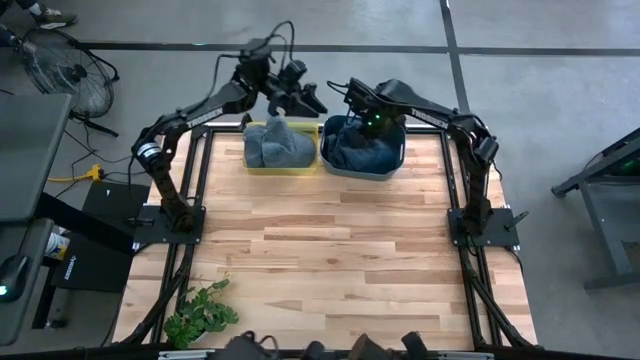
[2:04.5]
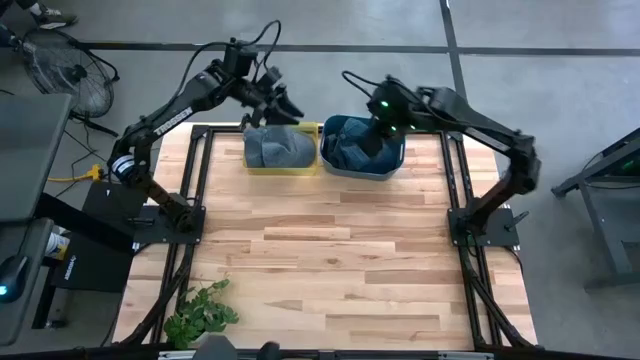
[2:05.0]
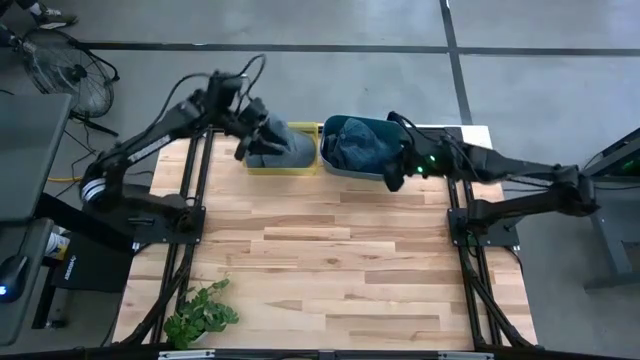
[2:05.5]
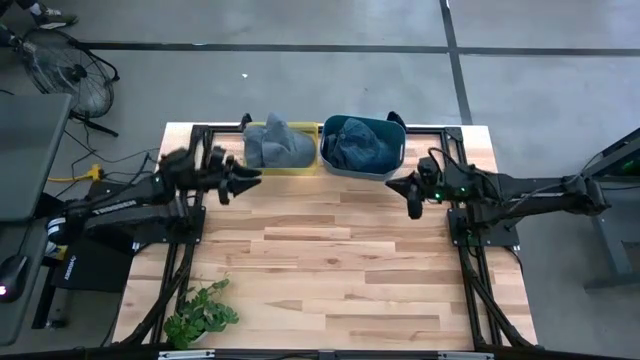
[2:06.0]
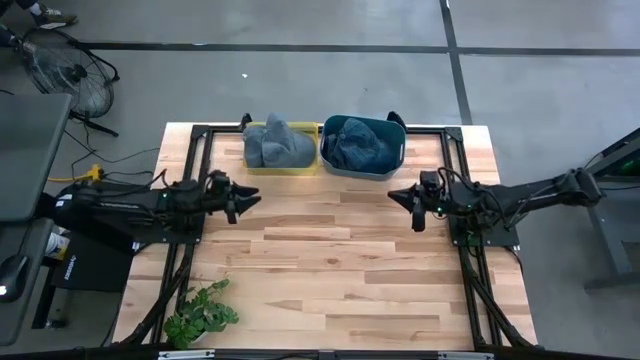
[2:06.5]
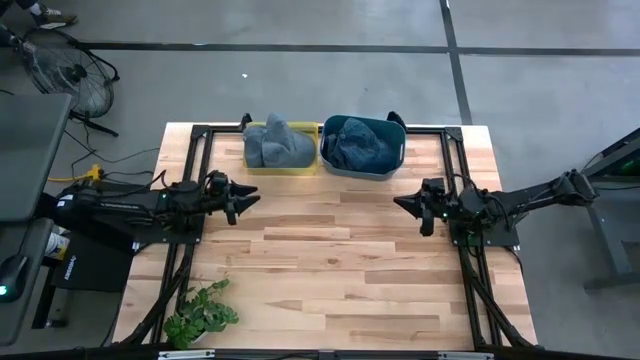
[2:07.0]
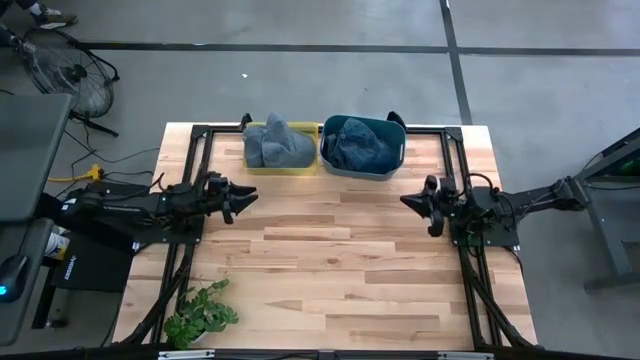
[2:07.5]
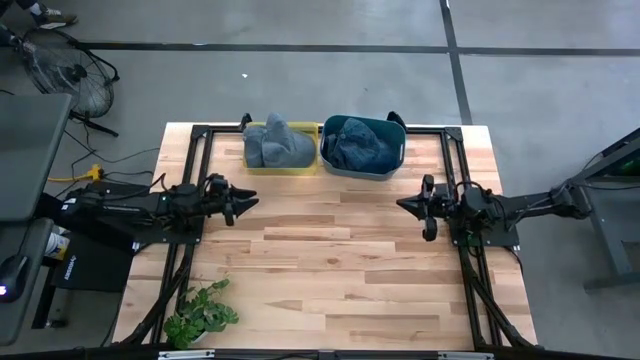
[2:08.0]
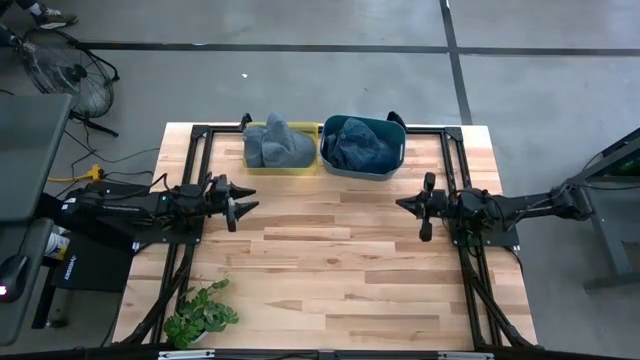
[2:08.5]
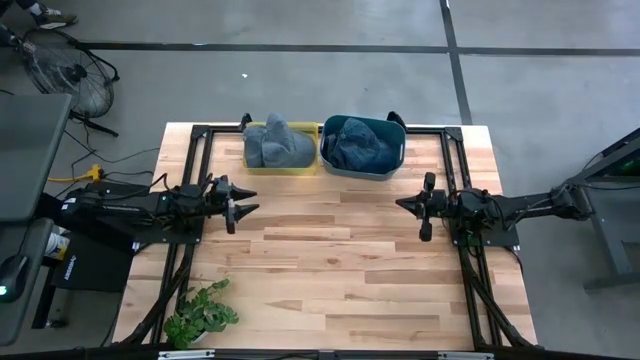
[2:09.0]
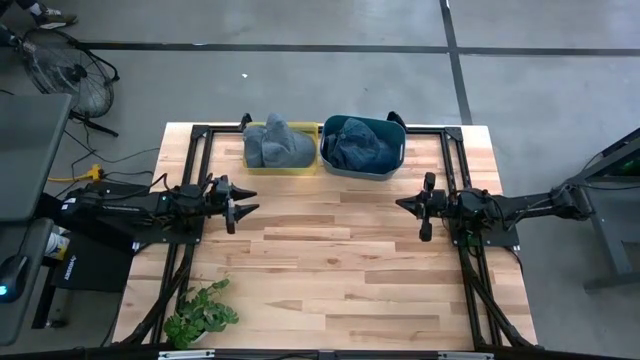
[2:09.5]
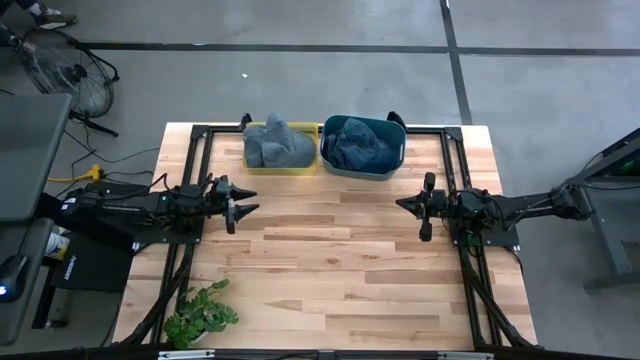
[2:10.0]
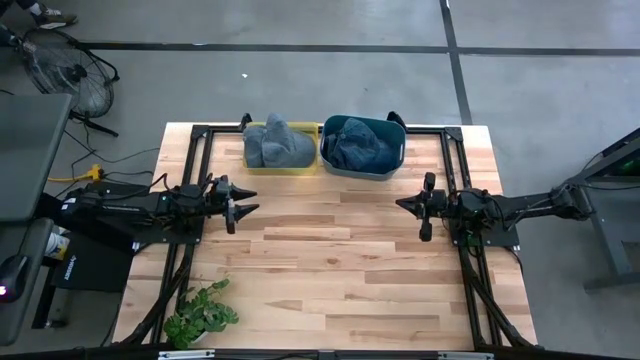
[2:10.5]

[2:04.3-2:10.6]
Task: Pick & Place hat
Return to Home Position

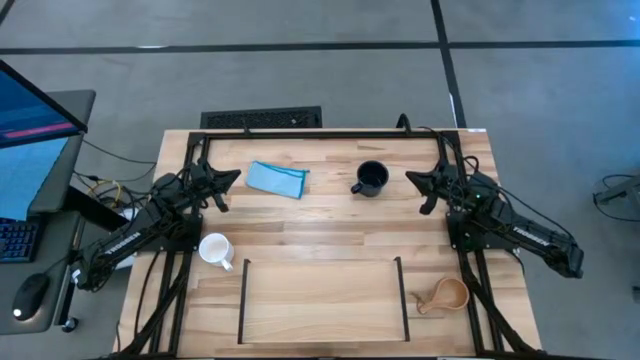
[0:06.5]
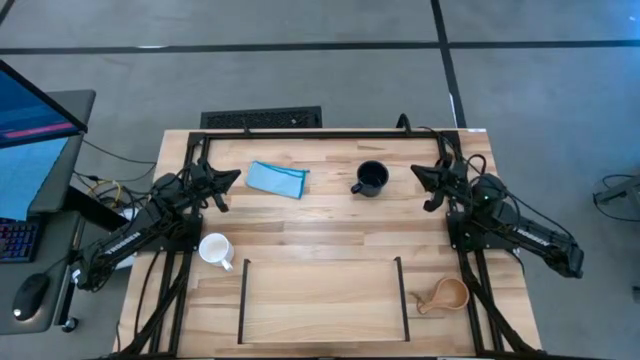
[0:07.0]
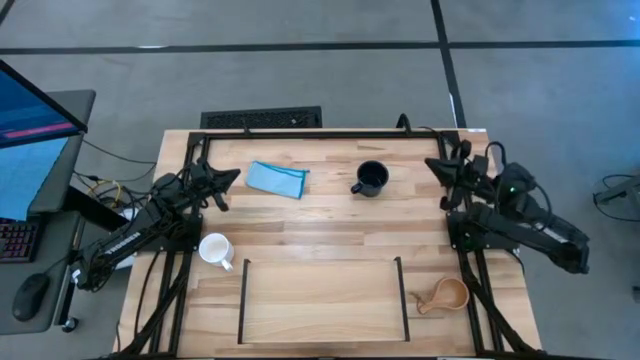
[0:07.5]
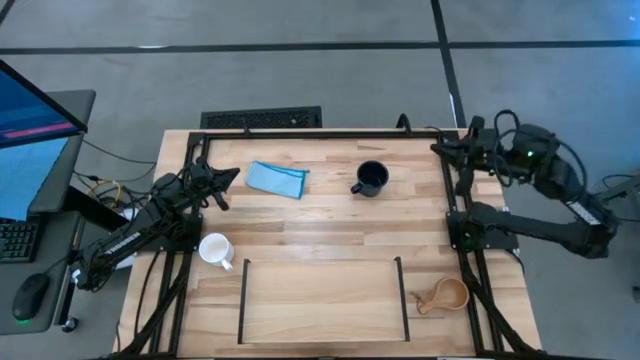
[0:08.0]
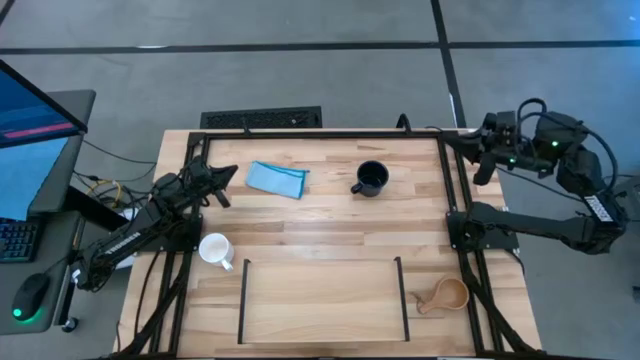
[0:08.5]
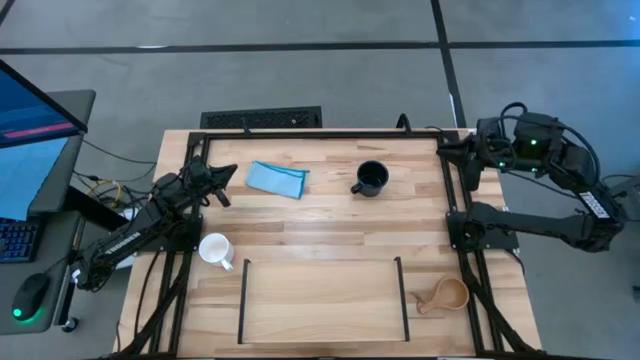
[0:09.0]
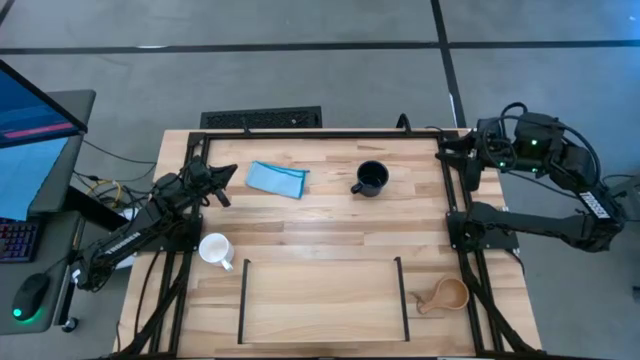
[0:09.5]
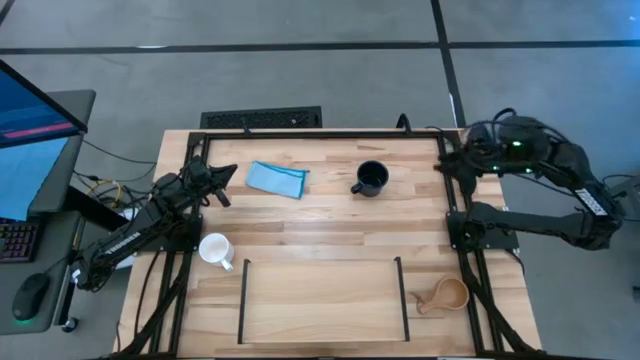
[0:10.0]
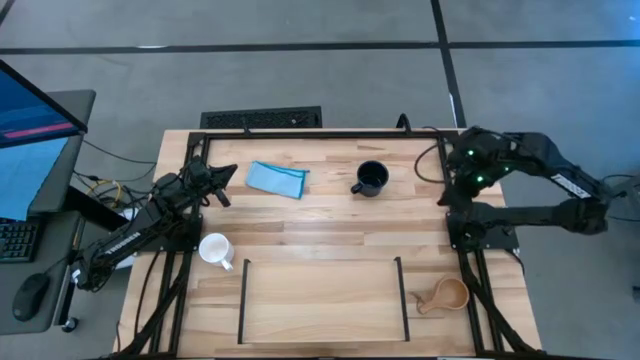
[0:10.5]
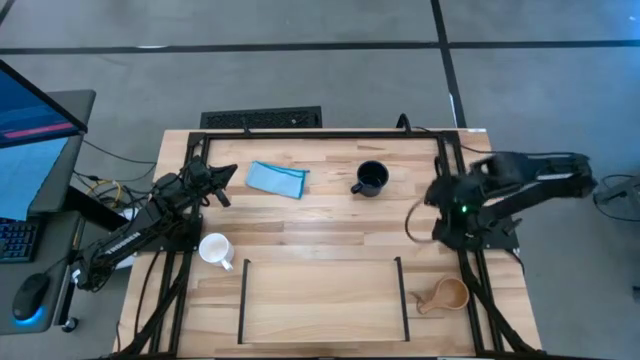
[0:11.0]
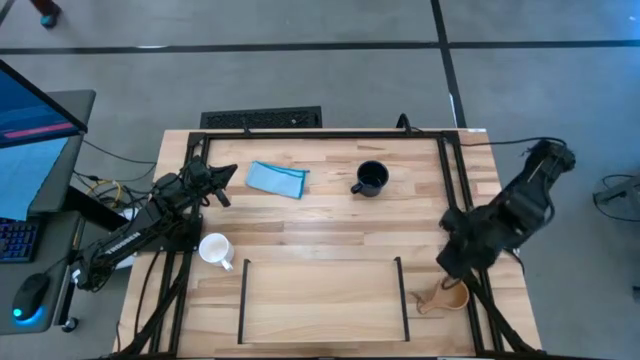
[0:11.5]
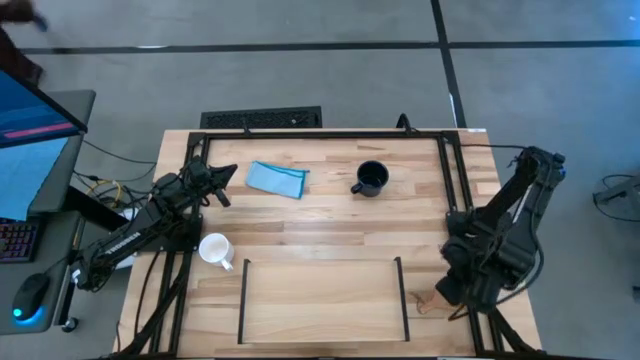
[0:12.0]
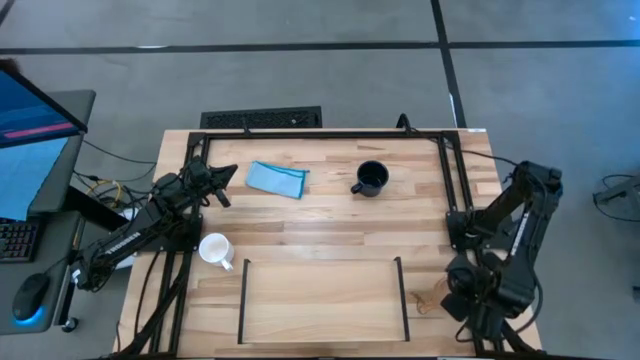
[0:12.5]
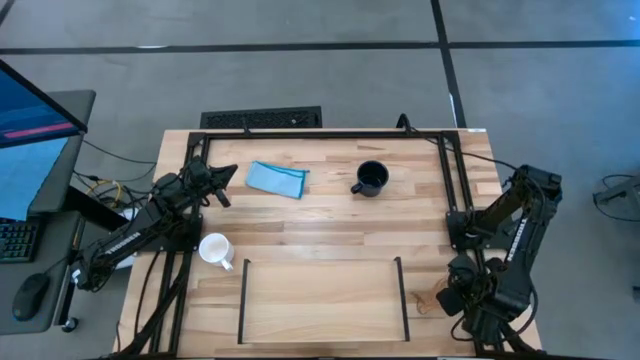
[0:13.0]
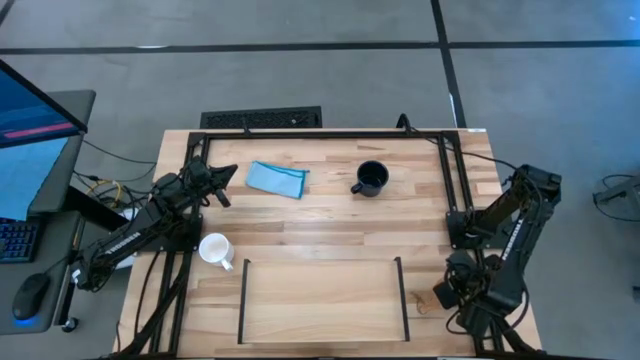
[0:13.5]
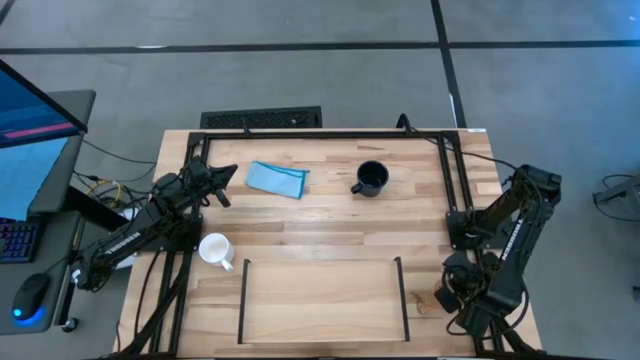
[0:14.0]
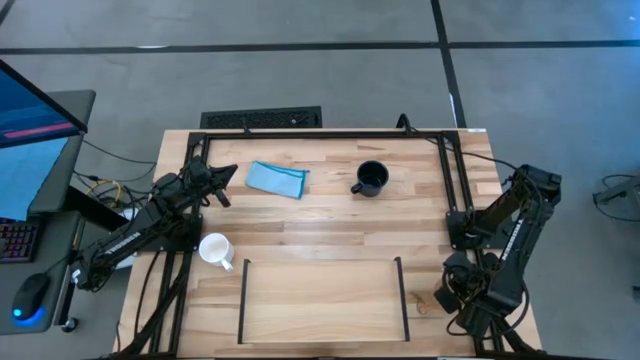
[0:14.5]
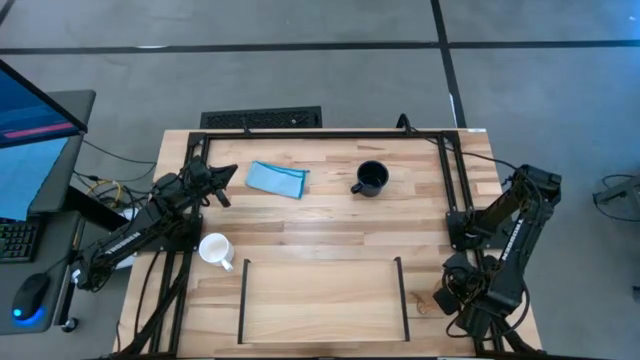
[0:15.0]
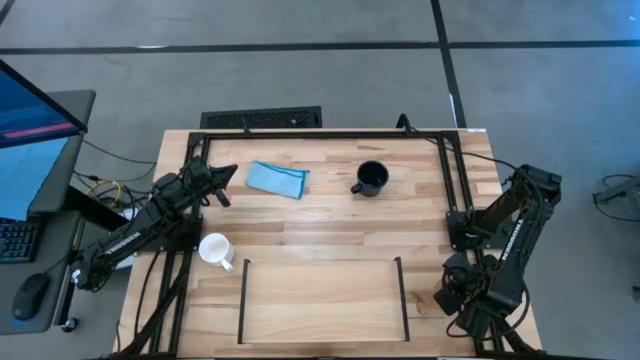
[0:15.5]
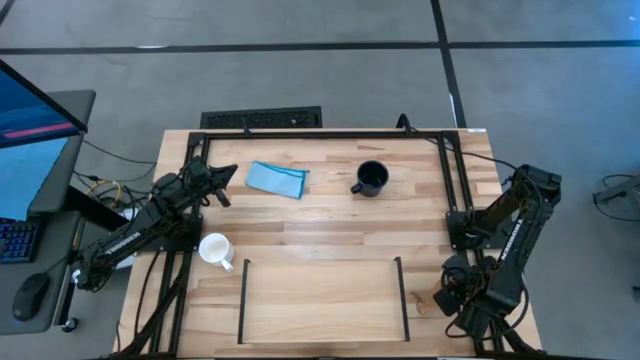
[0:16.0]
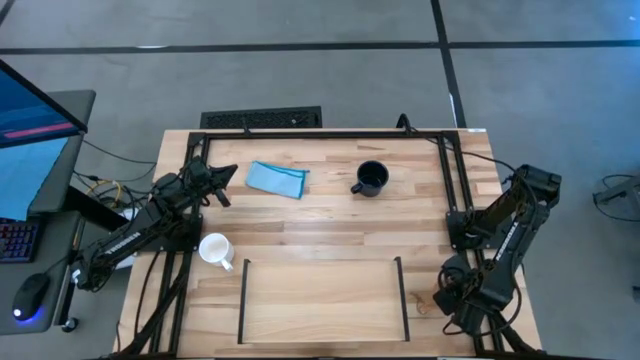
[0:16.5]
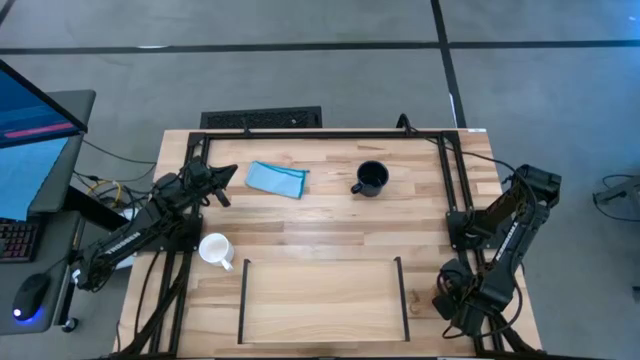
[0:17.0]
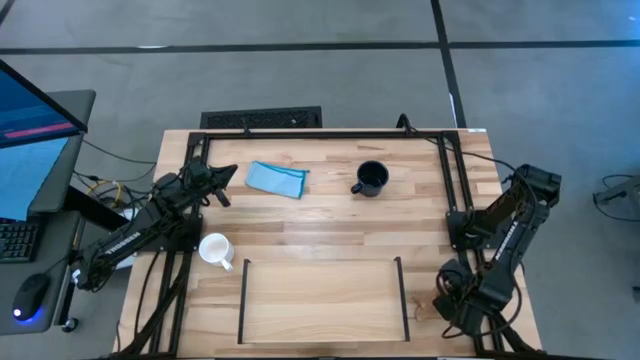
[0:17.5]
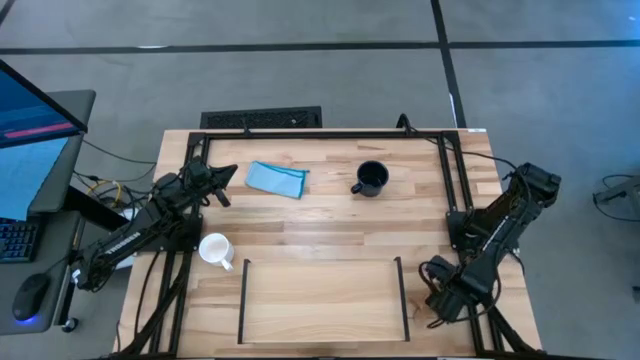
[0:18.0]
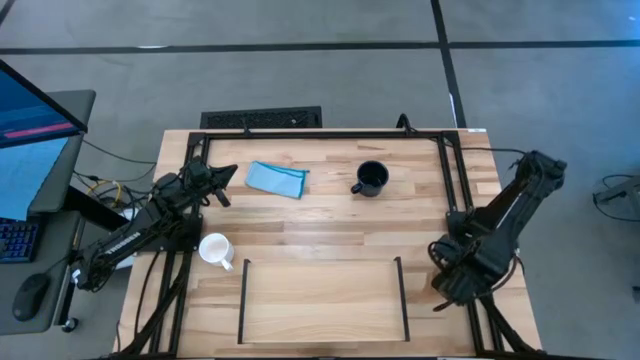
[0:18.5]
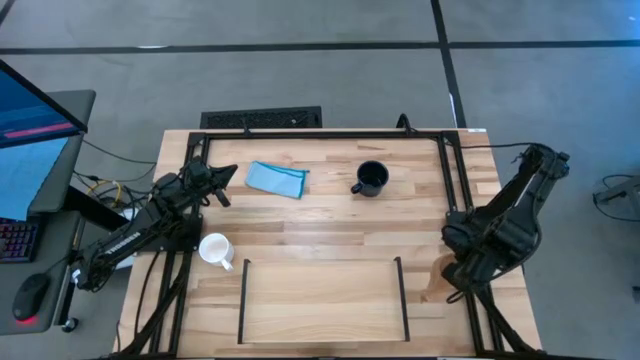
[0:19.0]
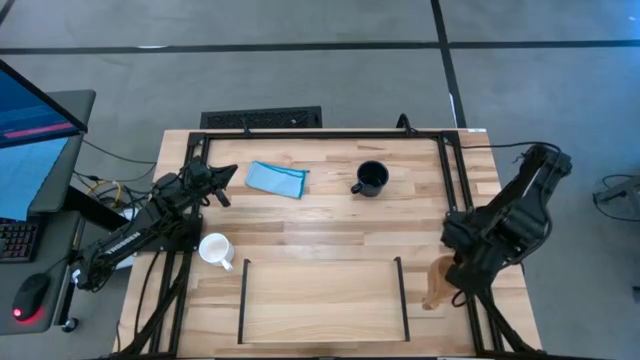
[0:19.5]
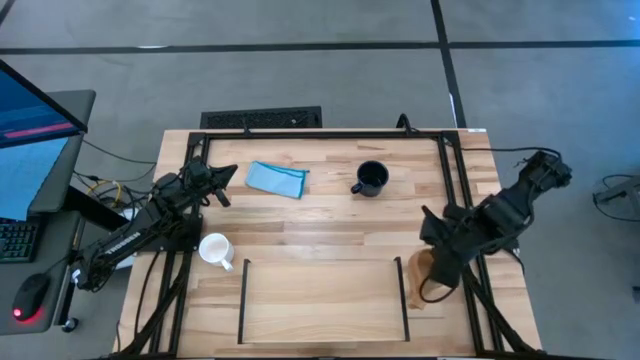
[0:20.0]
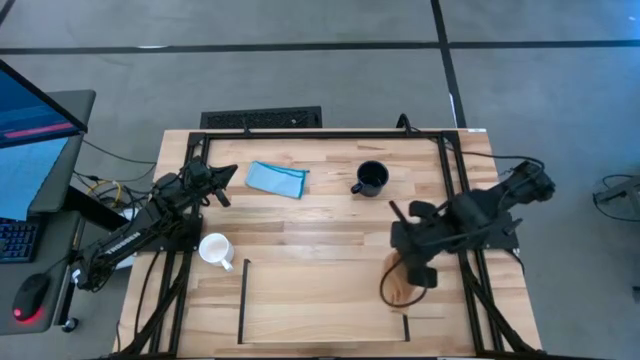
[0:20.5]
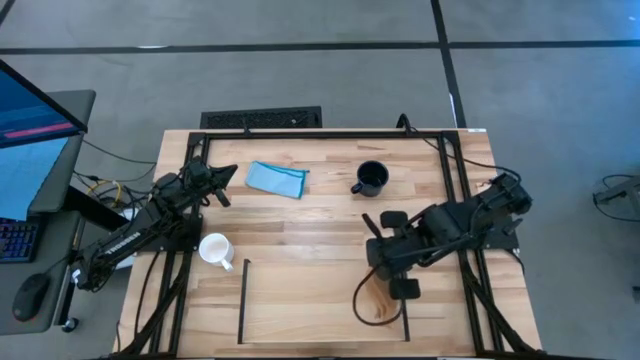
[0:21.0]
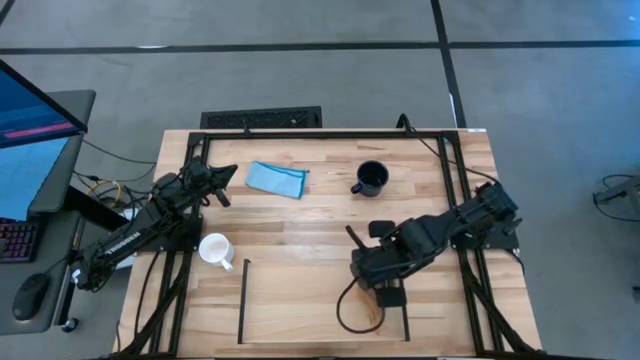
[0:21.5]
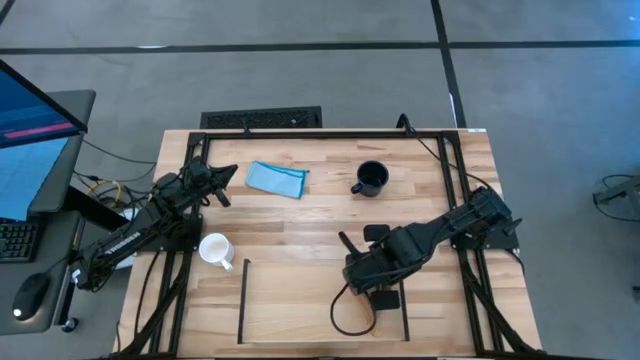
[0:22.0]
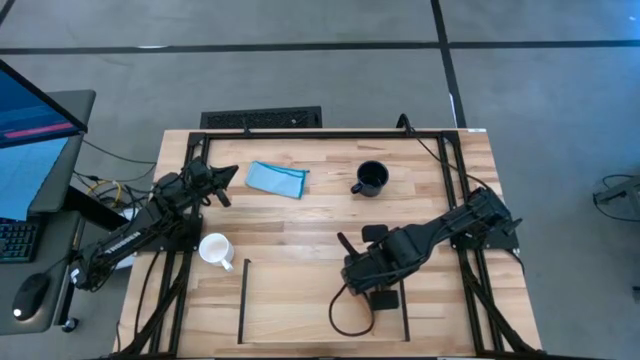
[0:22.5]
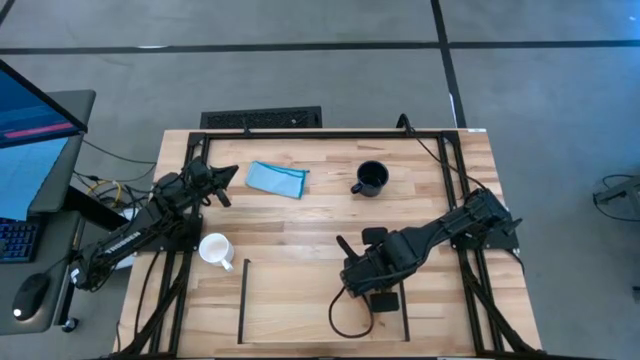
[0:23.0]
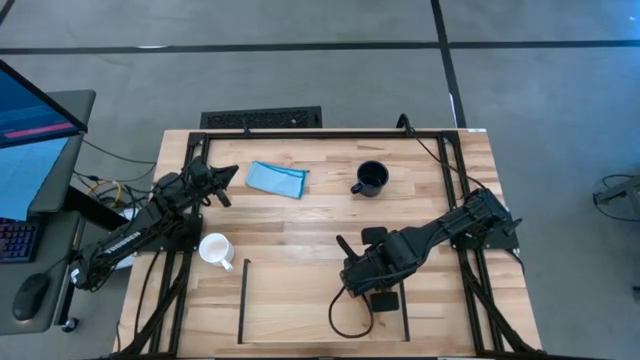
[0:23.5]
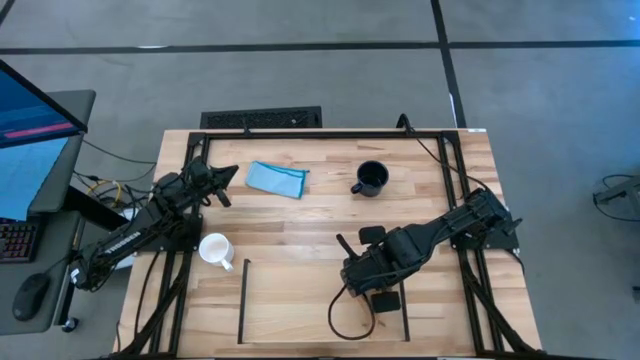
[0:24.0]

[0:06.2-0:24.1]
Task: Stack small to large cups/mugs on shelf
Put the wooden brown mug on the shelf
